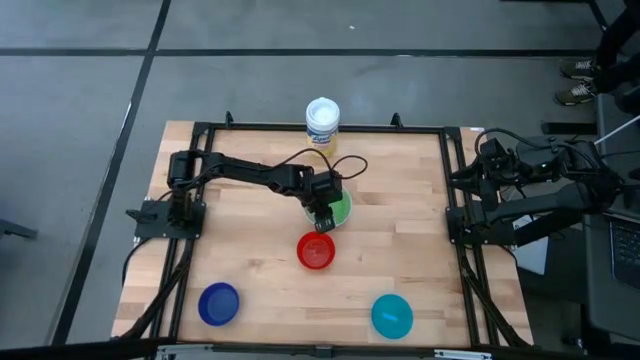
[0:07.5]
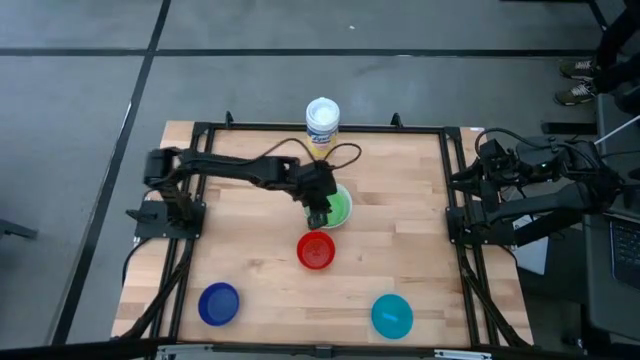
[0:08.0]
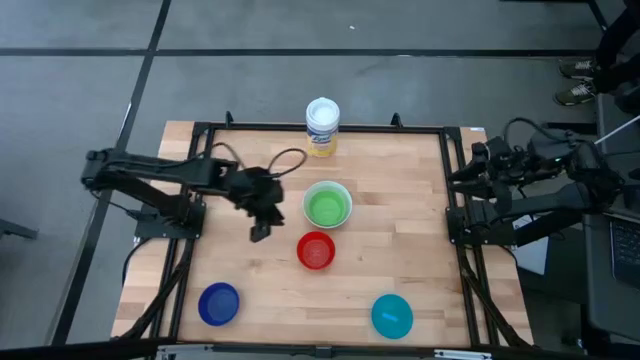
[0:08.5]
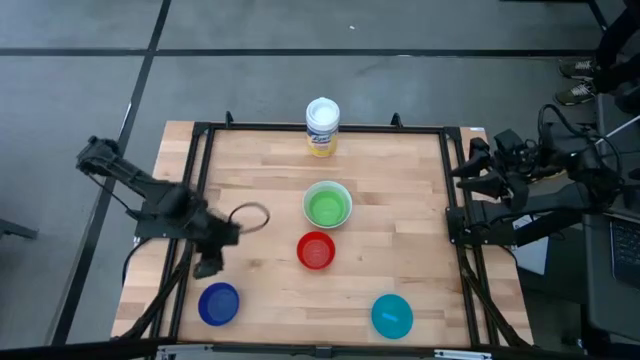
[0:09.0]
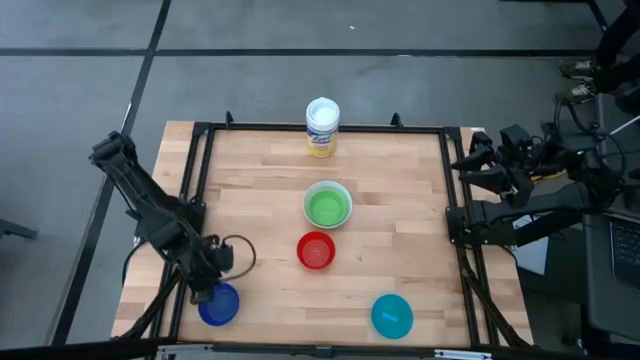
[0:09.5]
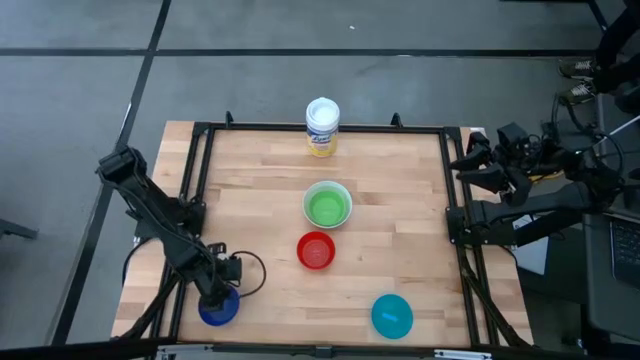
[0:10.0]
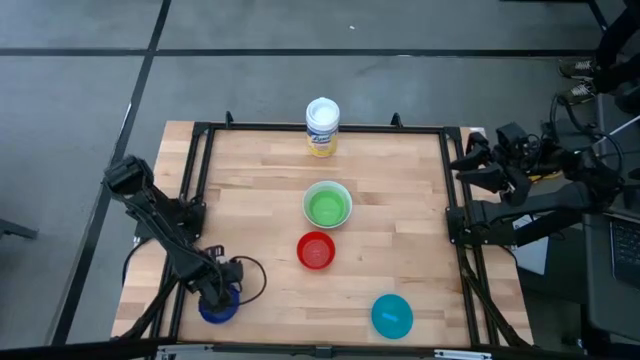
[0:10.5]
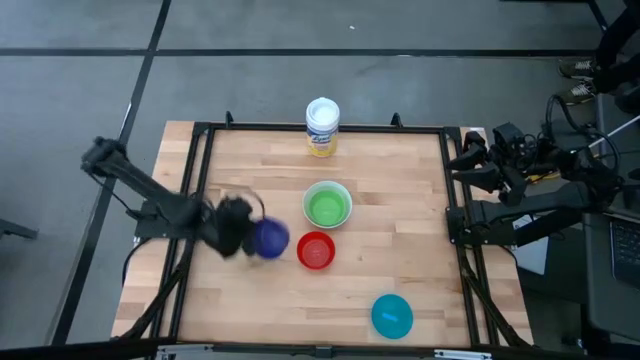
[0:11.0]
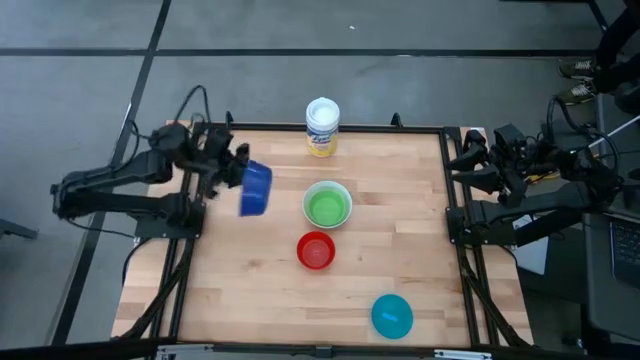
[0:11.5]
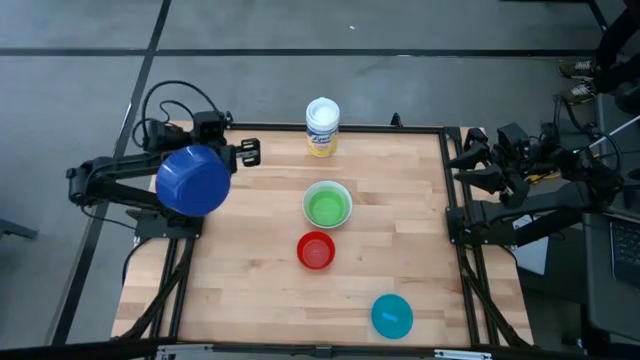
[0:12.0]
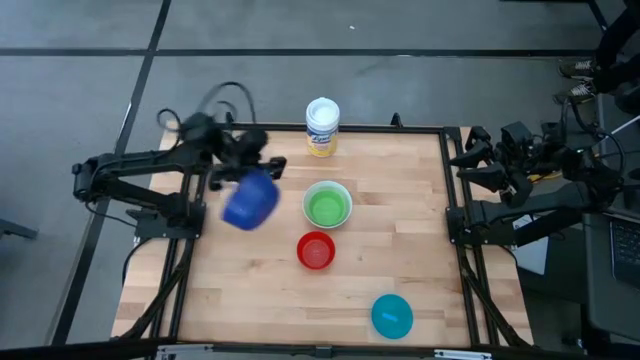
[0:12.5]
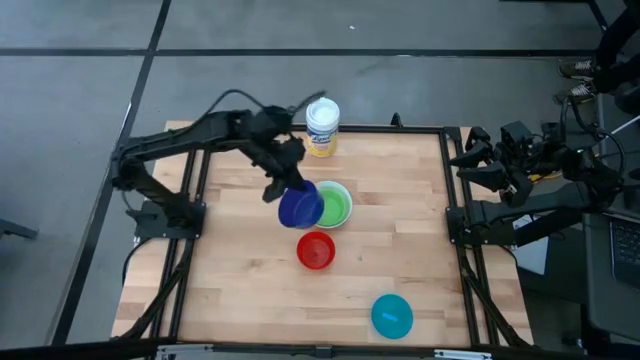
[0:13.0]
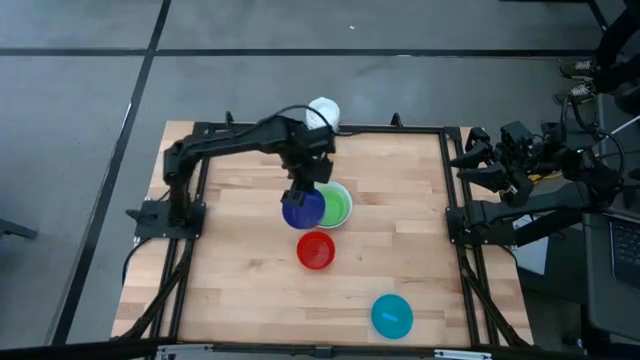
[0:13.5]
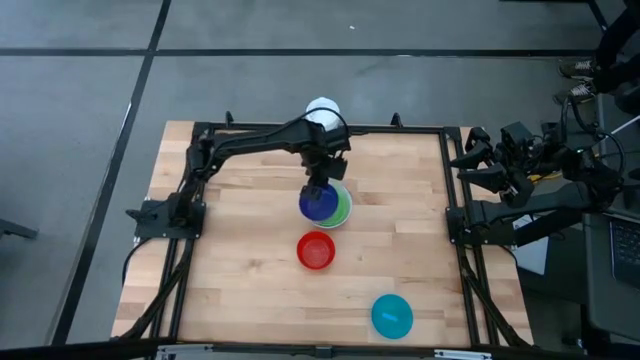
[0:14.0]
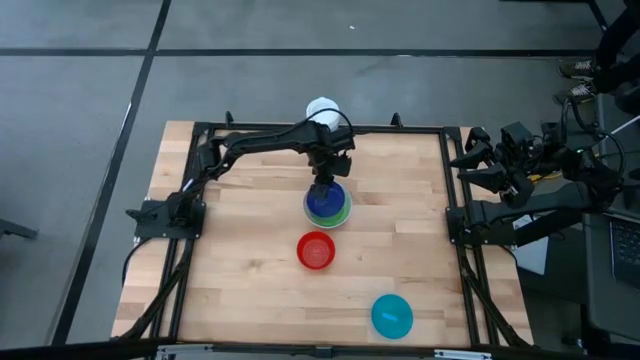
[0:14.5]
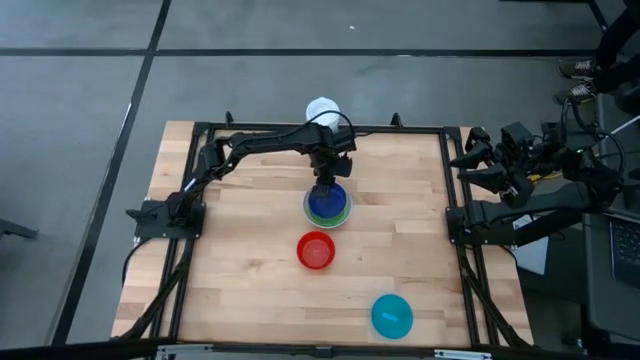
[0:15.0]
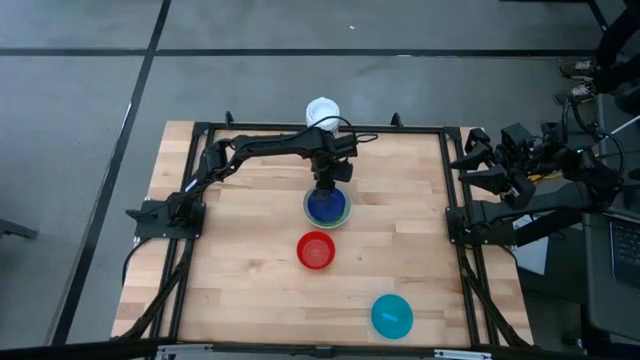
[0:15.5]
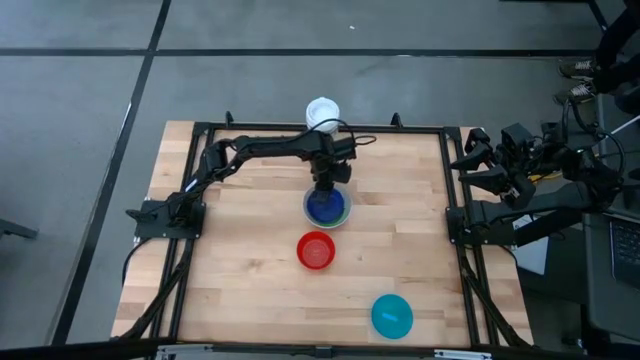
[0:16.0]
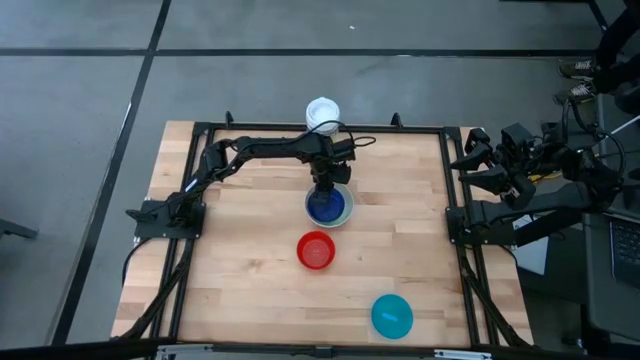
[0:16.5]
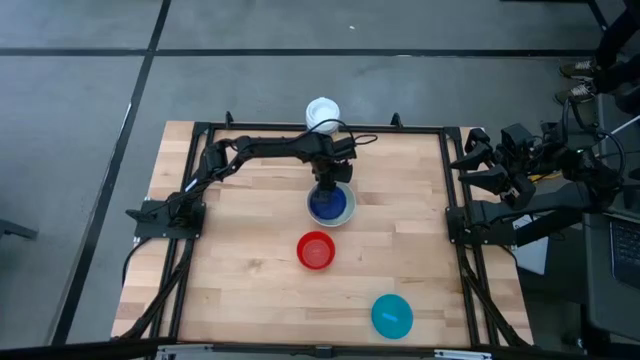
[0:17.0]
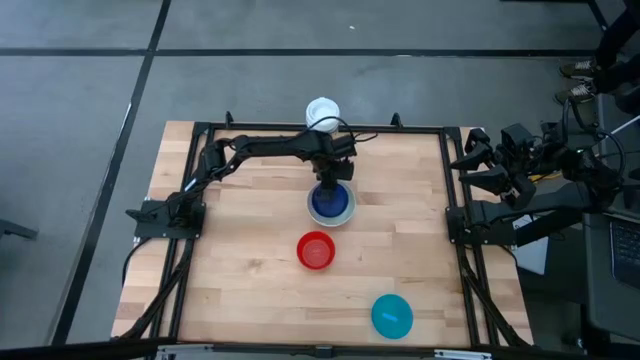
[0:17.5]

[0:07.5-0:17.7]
Stack the blue bowl on the green bowl

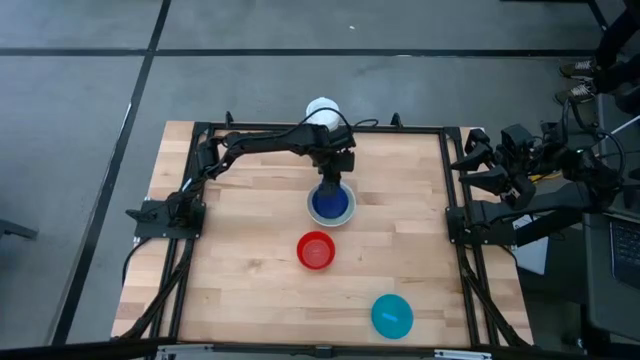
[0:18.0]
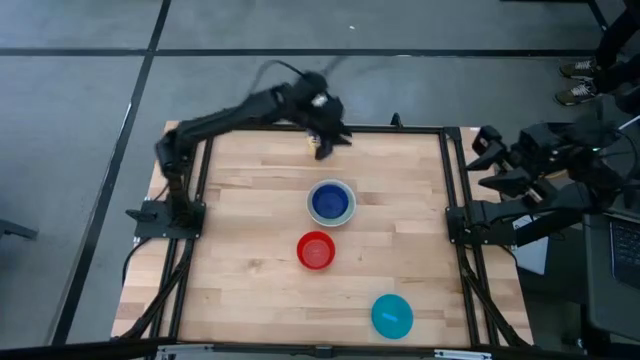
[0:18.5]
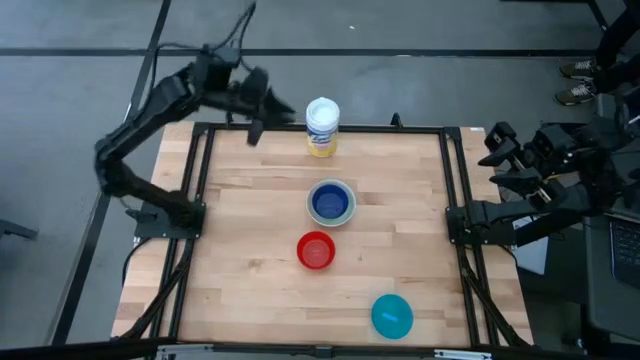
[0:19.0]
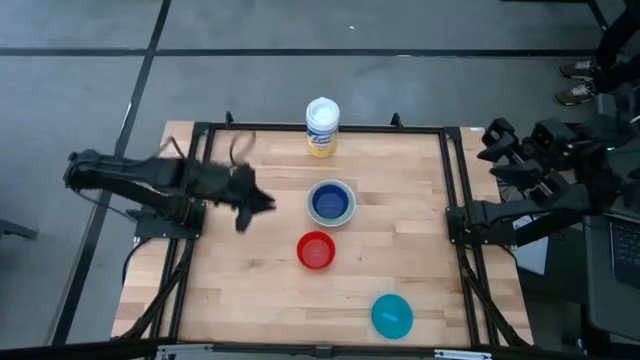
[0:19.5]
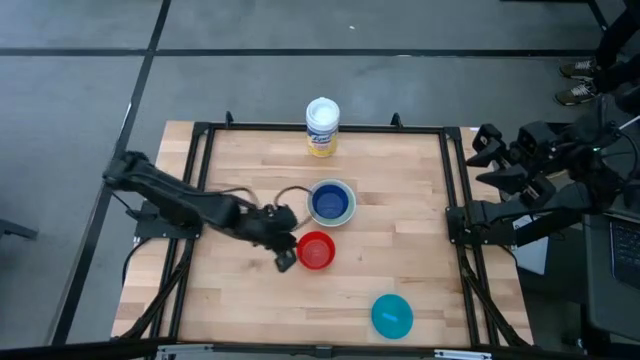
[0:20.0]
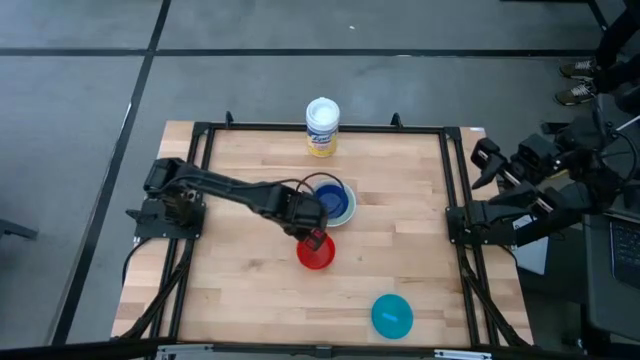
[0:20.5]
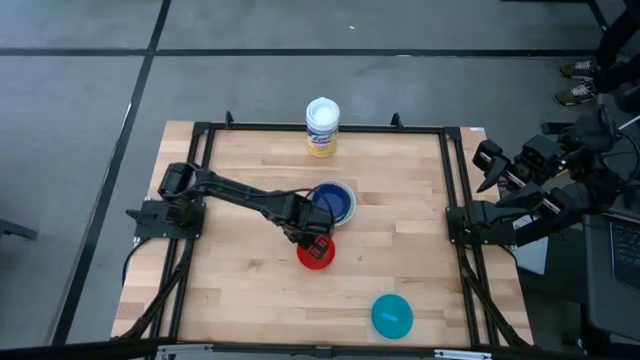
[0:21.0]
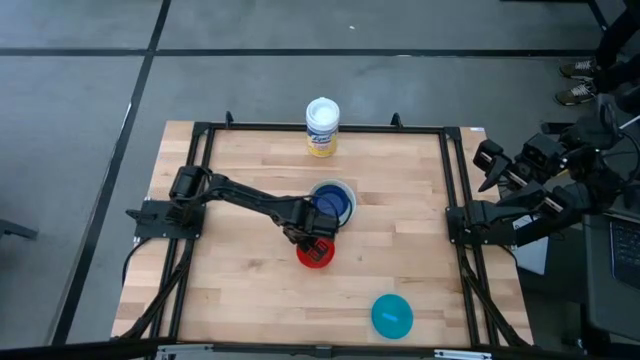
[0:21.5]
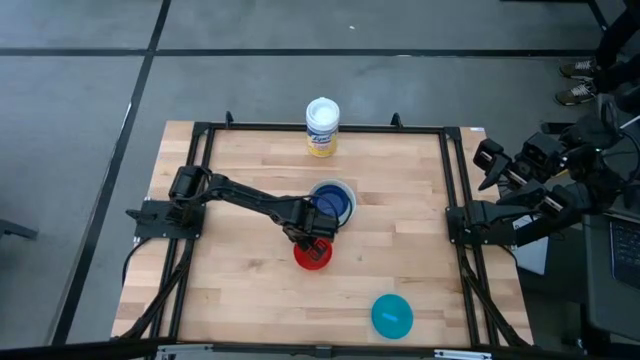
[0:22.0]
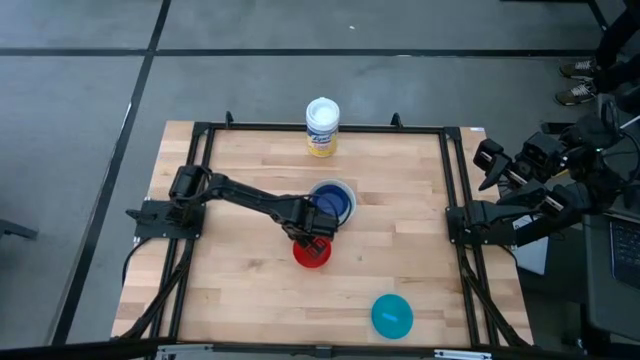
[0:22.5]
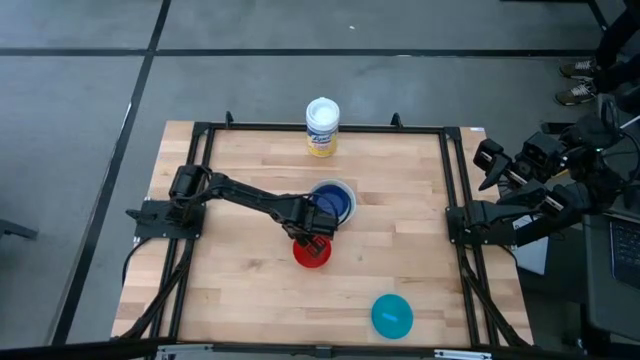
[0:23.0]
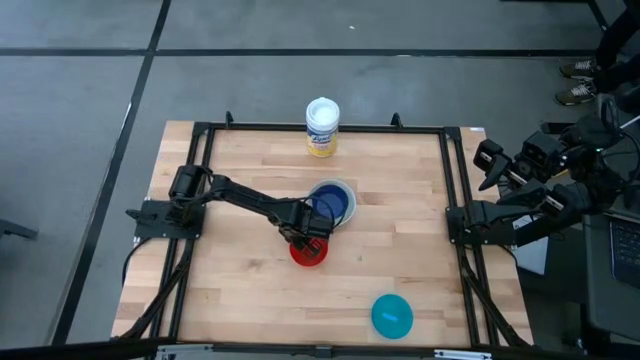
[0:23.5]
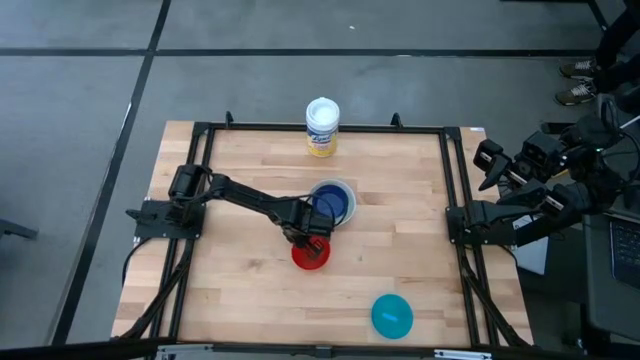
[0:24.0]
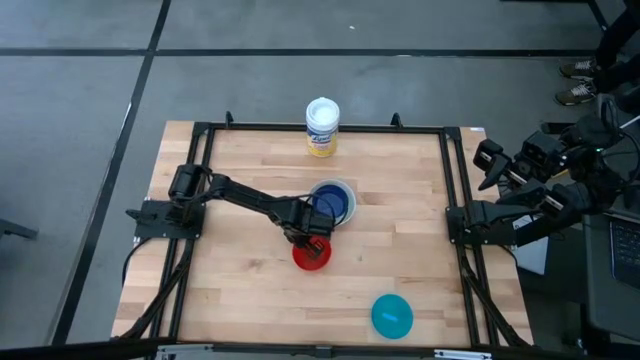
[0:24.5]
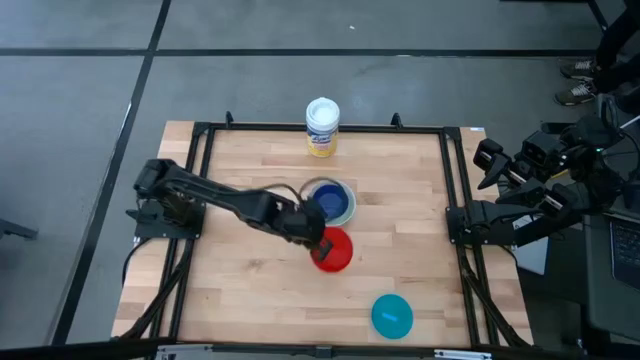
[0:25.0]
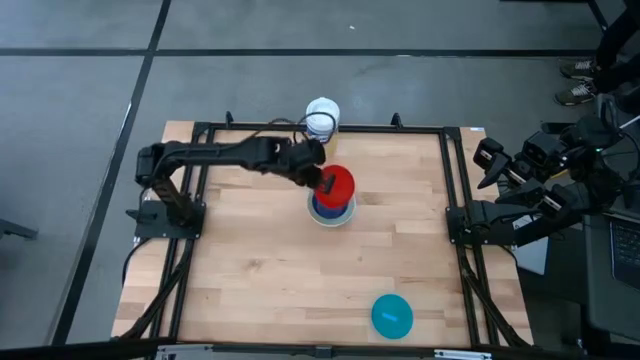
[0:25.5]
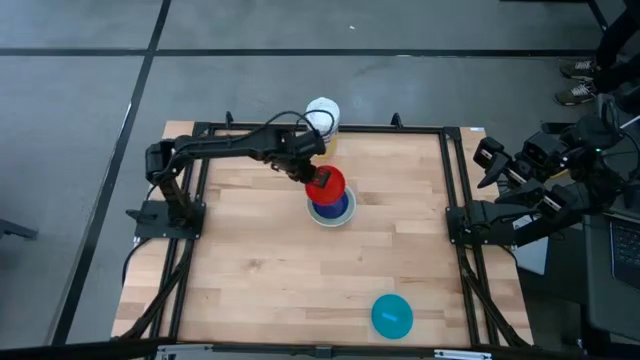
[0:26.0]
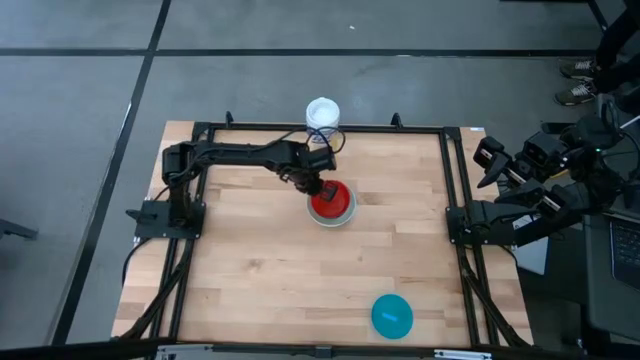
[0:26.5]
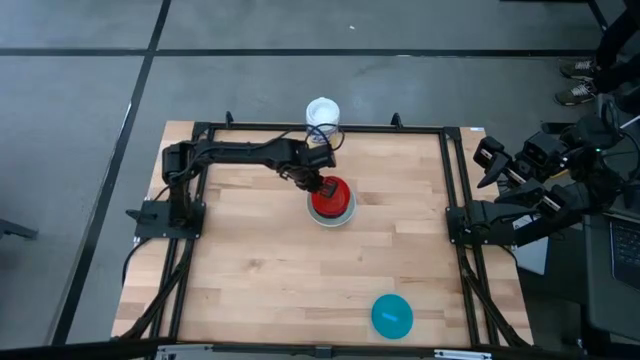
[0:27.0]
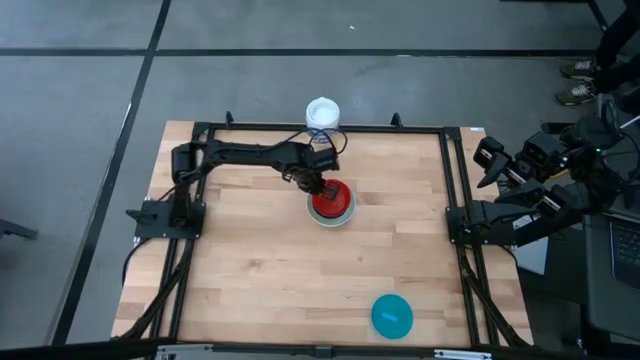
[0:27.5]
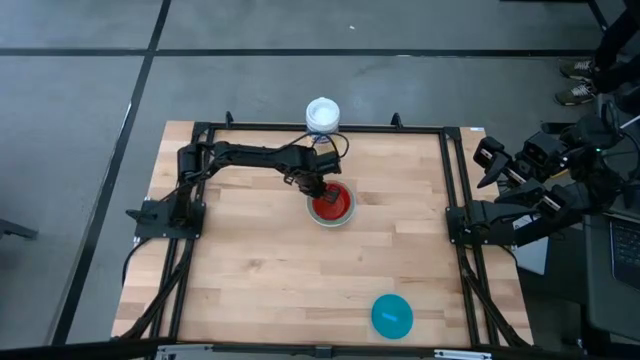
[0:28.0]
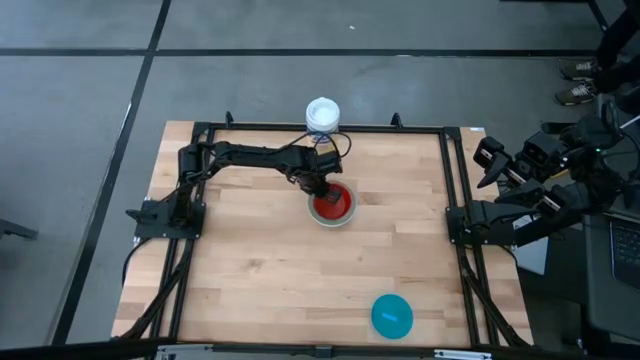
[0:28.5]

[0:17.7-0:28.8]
Stack the red bowl on the blue bowl
